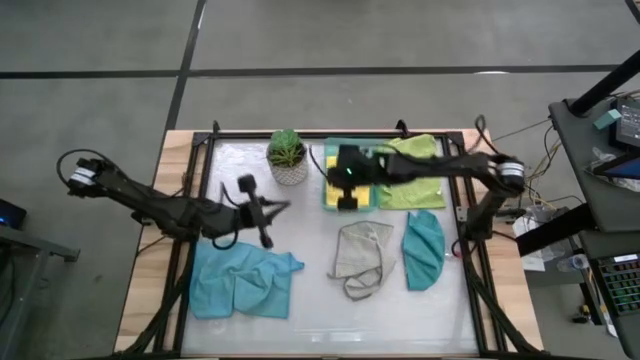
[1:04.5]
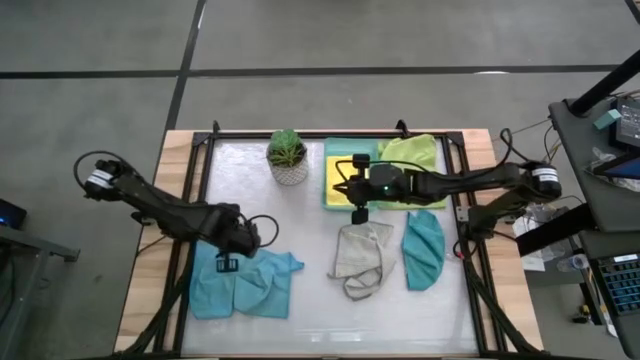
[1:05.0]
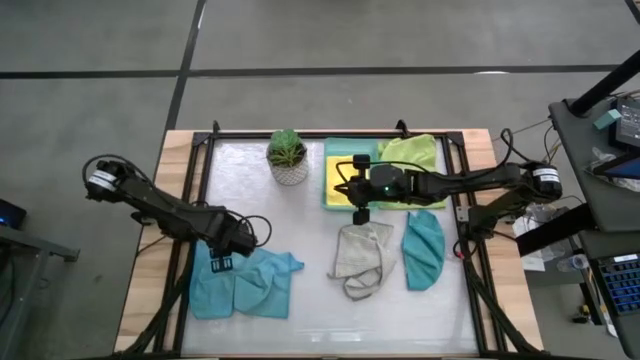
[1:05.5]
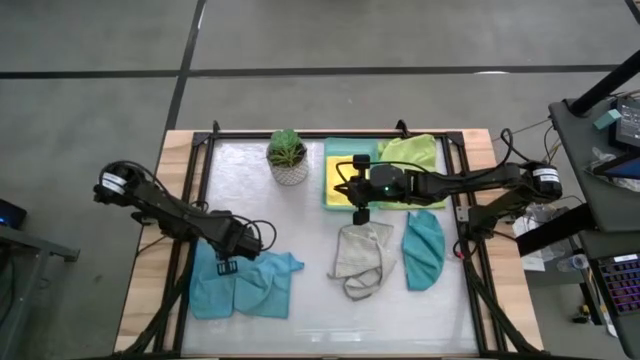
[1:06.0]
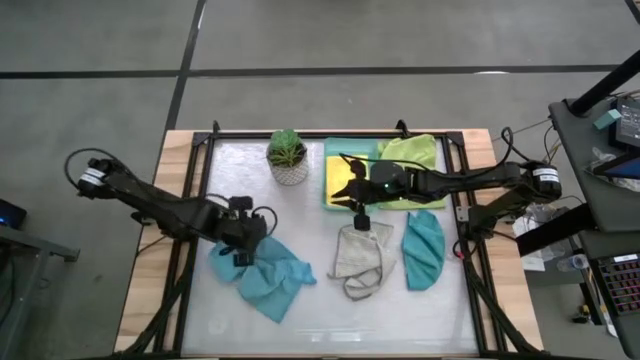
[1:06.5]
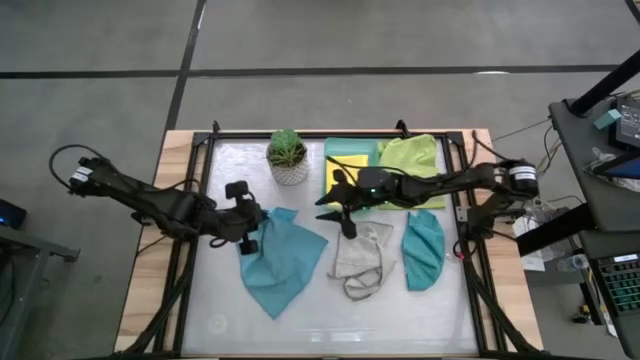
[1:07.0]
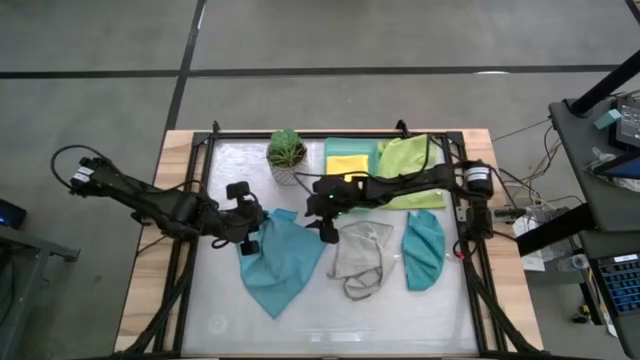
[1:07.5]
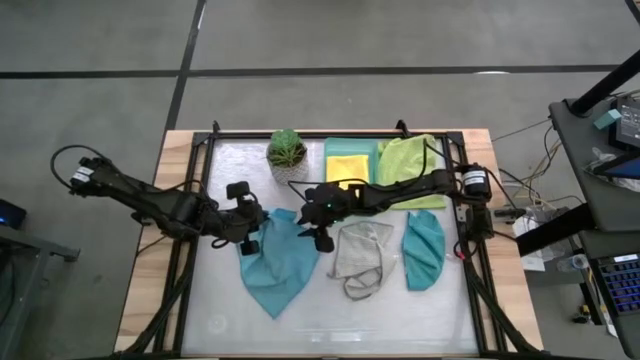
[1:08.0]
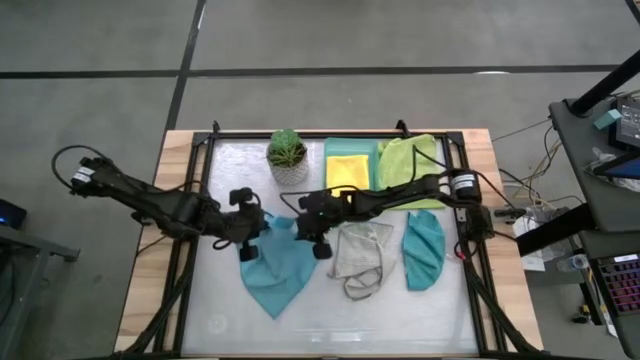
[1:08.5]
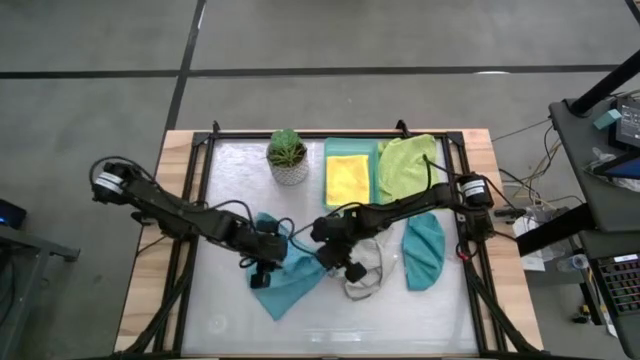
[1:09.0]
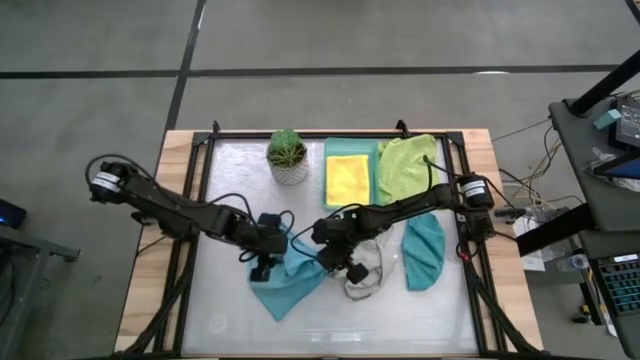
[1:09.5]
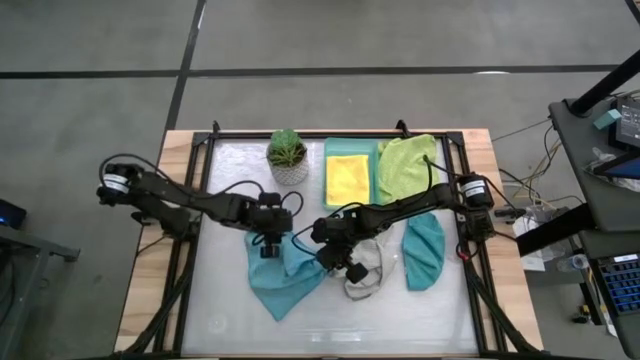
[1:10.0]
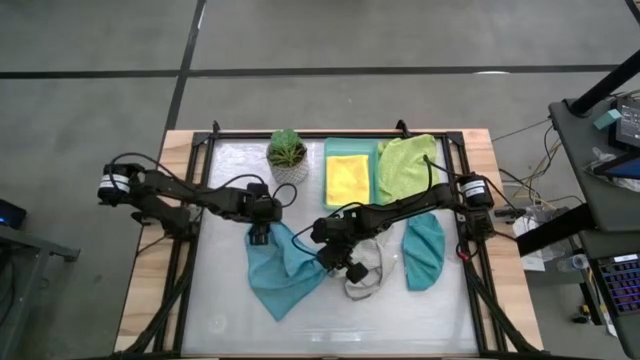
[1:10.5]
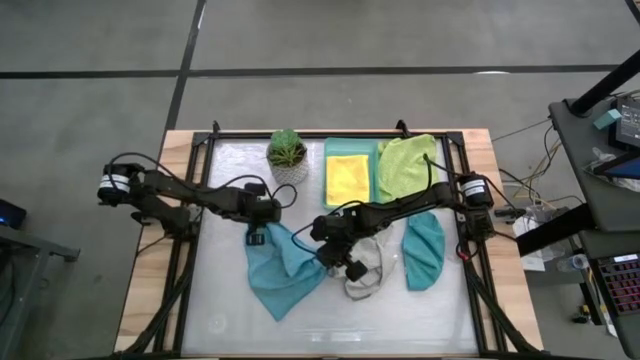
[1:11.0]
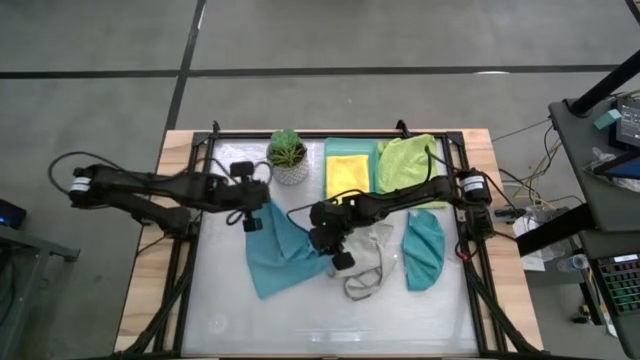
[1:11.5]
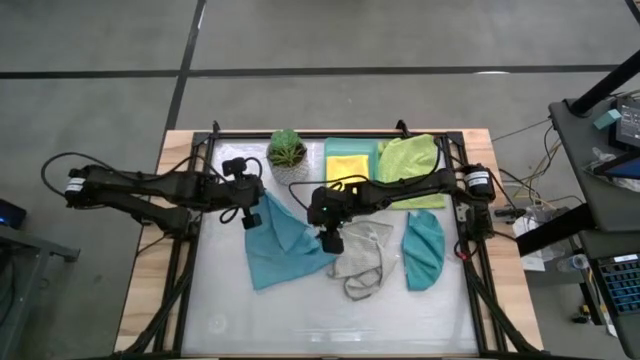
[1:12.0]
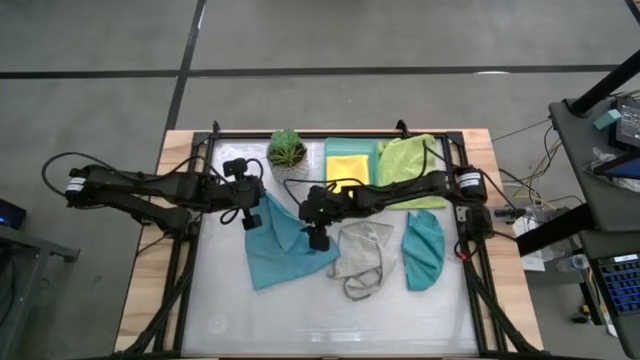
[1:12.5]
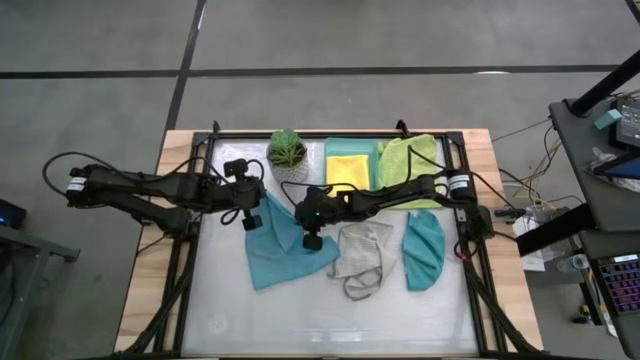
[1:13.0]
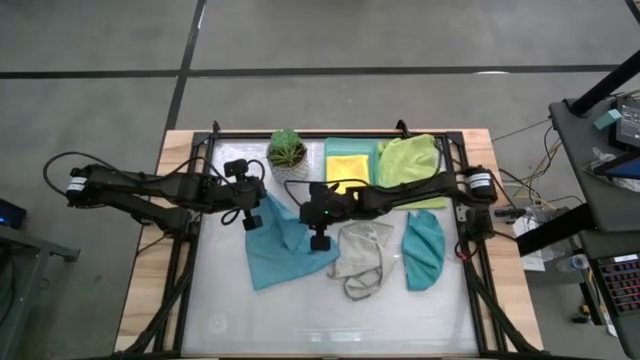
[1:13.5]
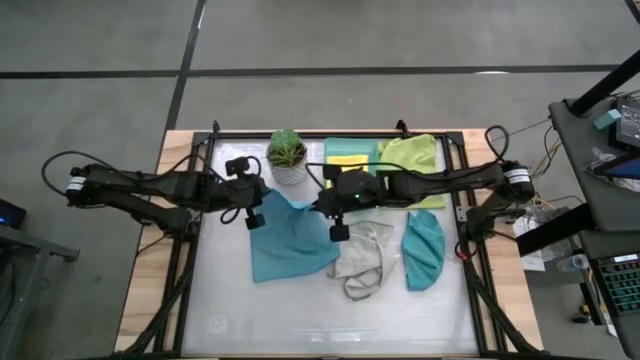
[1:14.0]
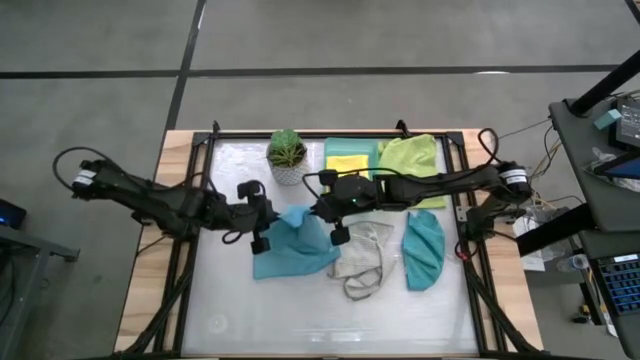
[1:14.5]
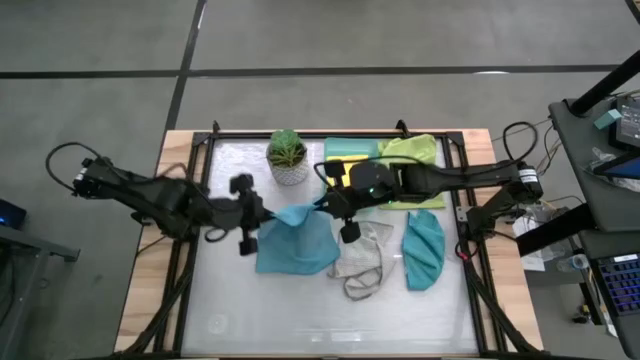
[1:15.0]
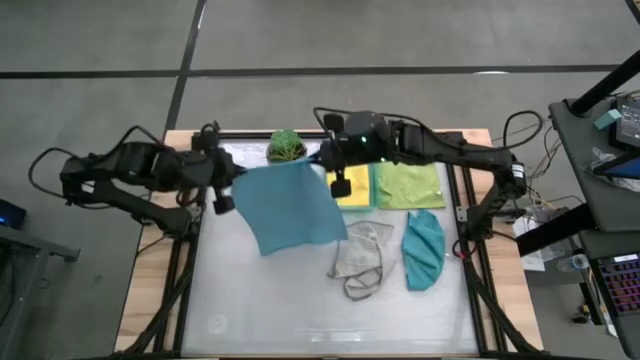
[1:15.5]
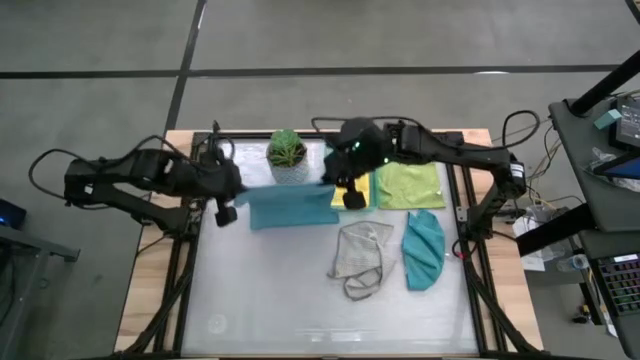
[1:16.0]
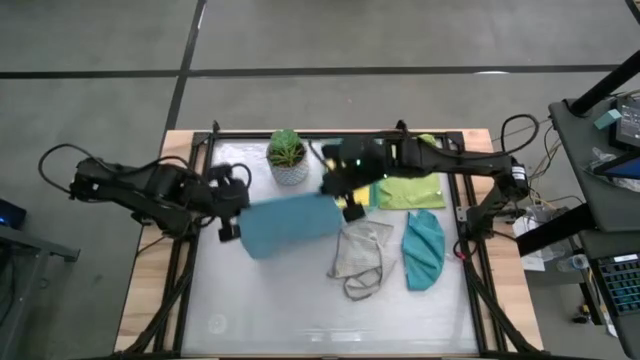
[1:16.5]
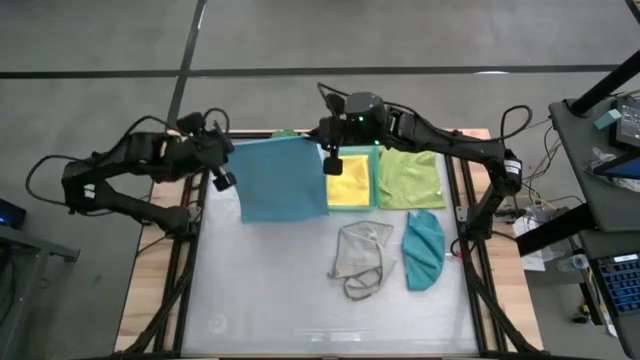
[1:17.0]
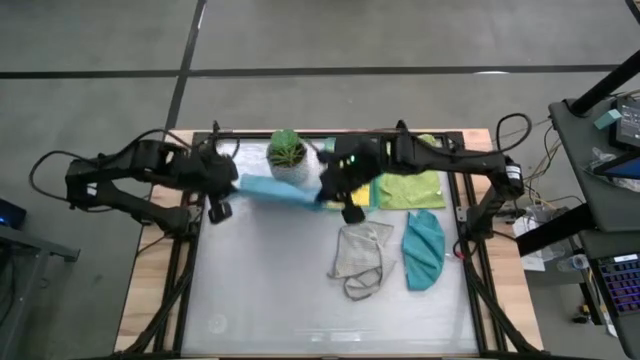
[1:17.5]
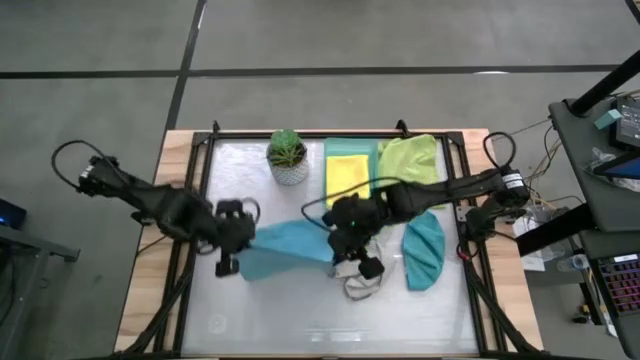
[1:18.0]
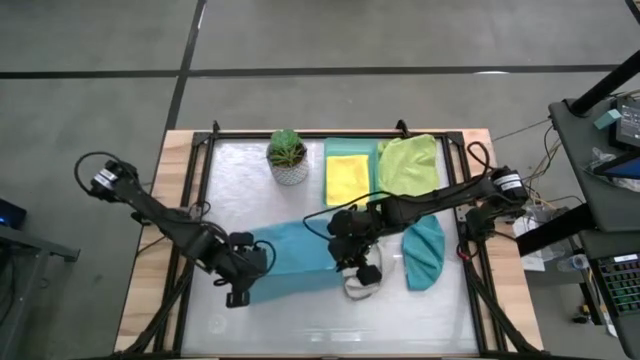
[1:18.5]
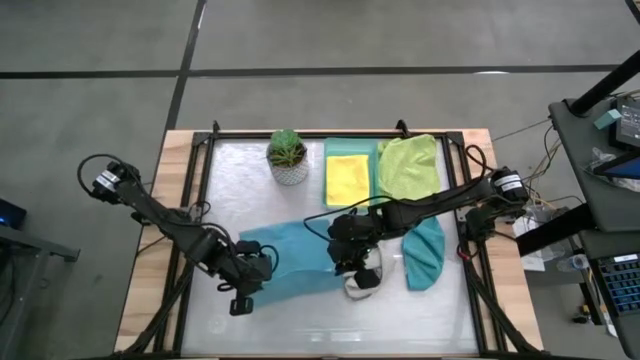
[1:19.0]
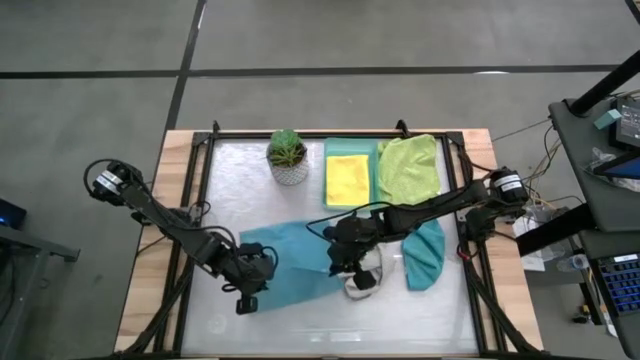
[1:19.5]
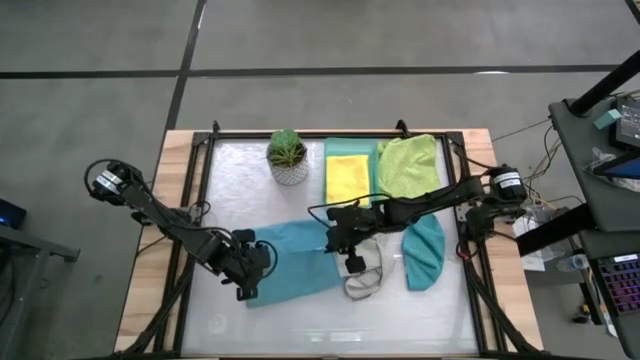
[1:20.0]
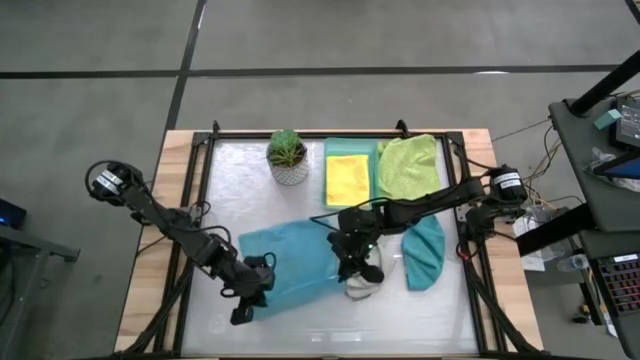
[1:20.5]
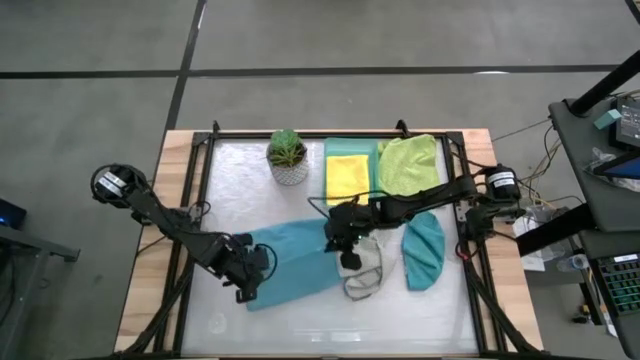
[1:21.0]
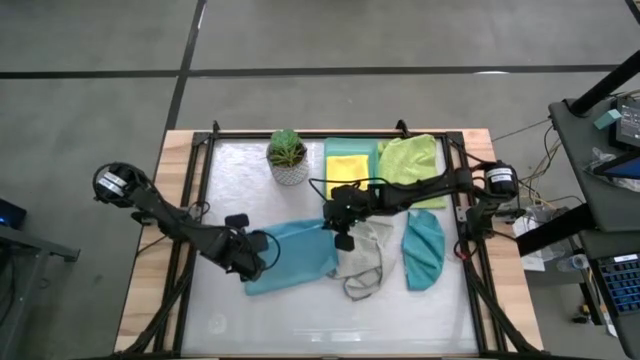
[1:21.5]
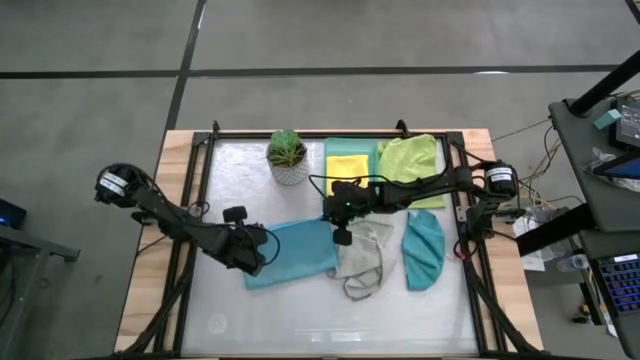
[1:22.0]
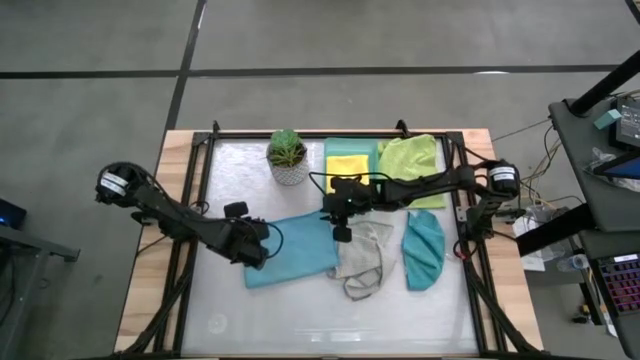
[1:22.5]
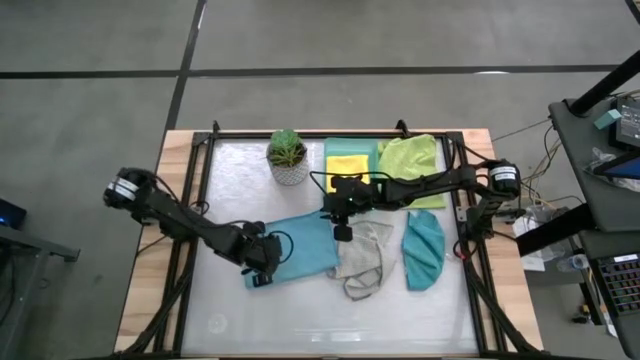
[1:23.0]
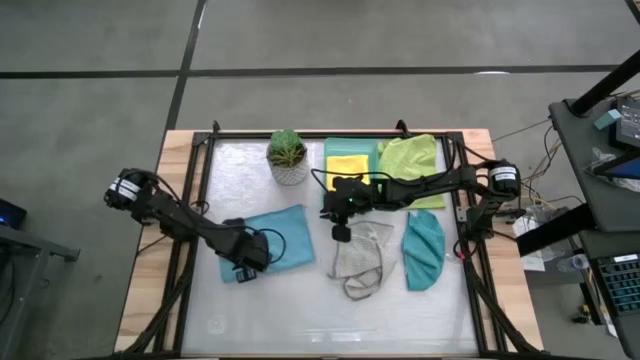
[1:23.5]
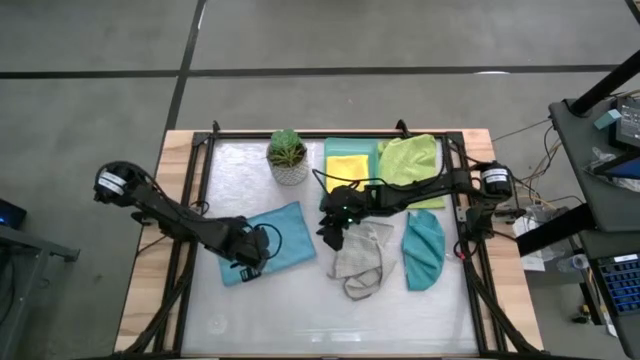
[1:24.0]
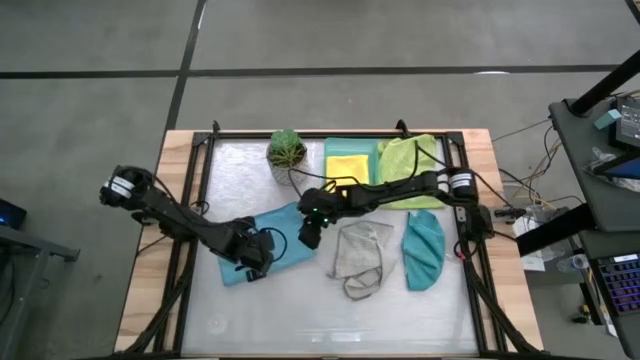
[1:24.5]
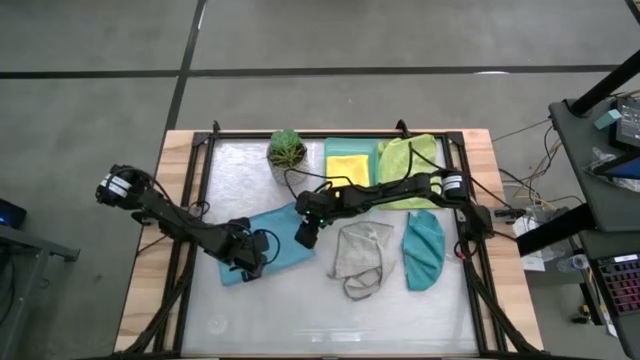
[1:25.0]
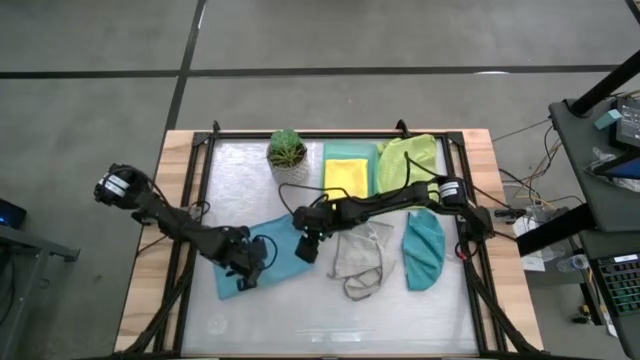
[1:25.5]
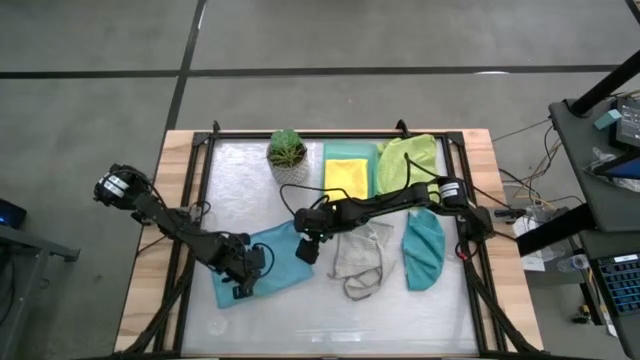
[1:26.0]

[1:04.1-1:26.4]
Task: Fold microfiber towels
Fold the left blue microfiber cloth
